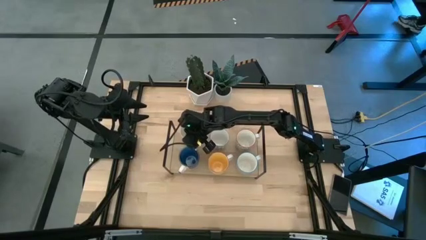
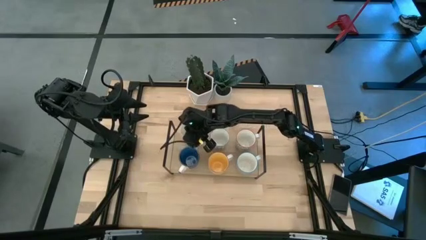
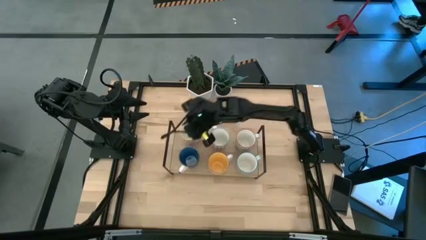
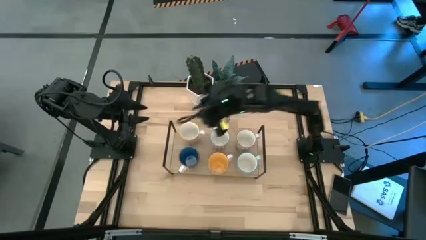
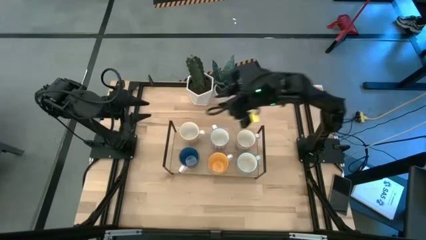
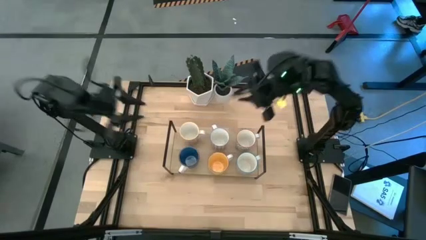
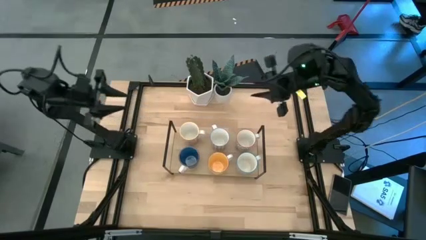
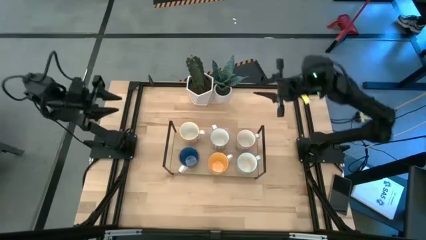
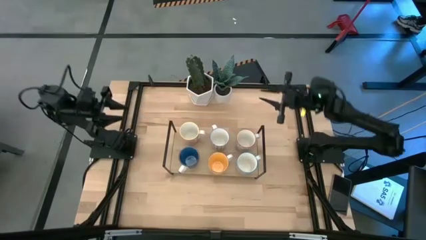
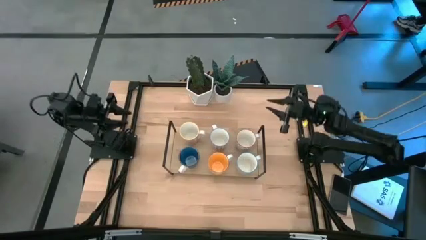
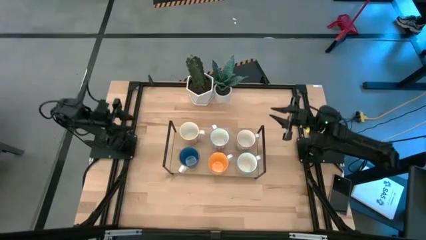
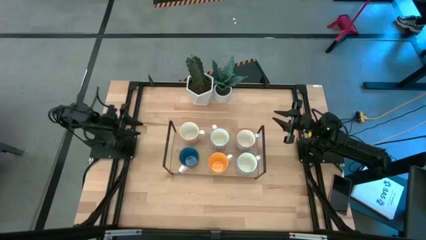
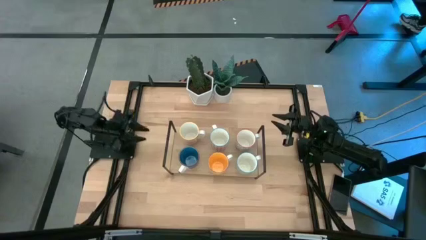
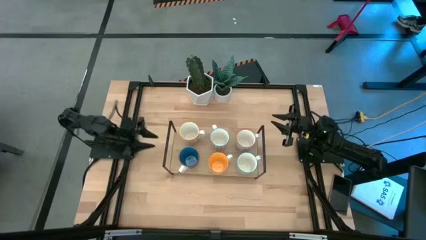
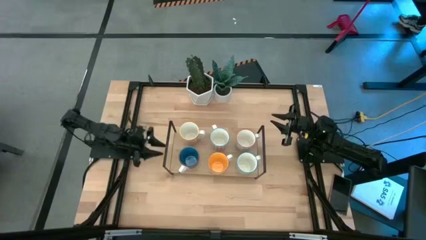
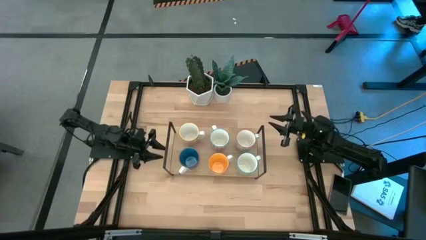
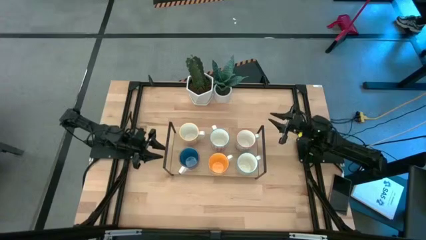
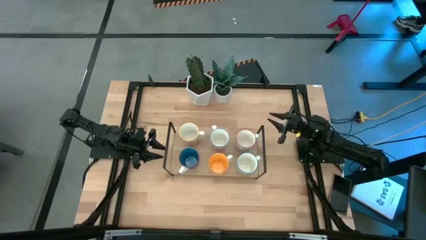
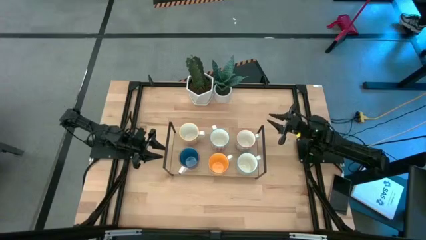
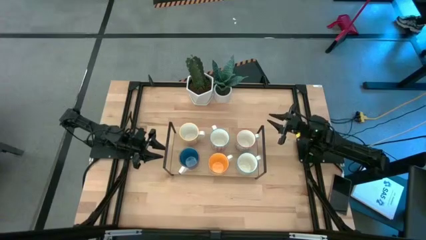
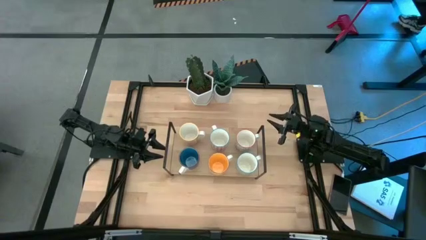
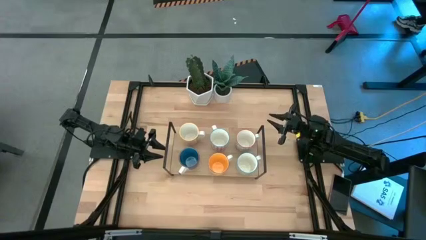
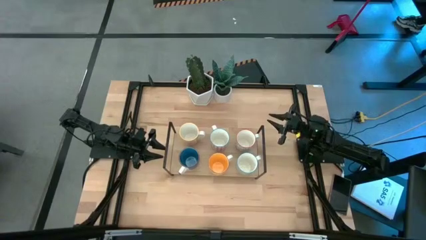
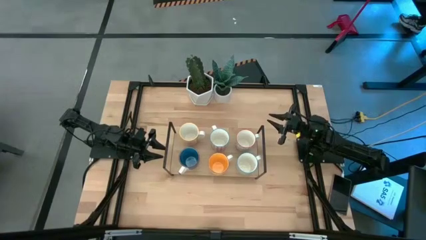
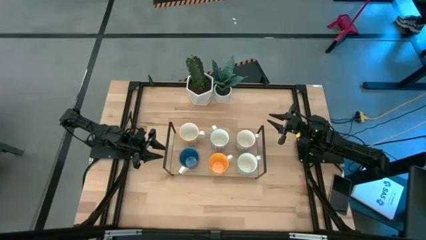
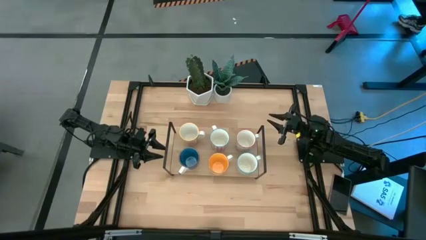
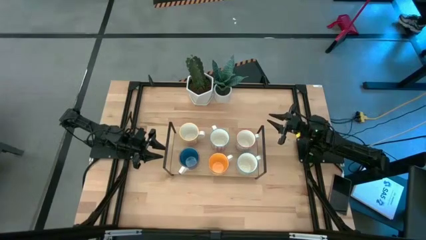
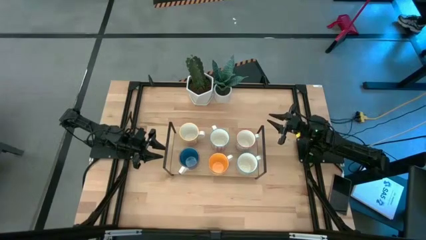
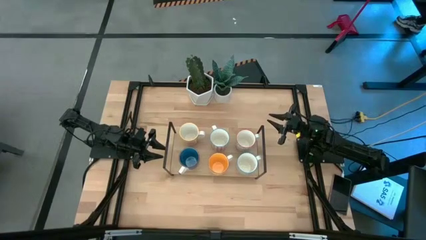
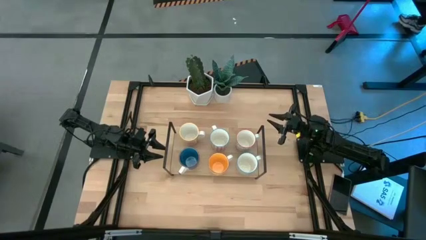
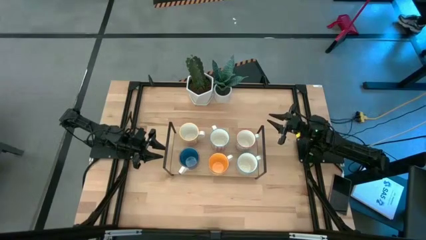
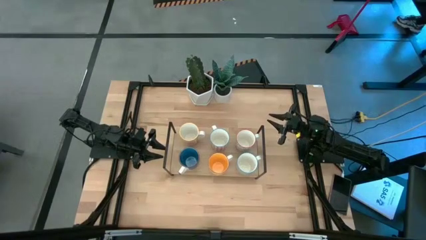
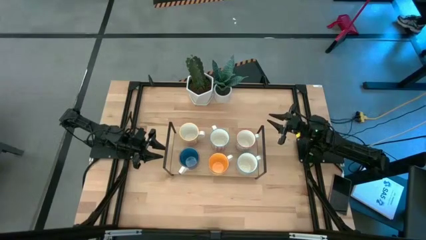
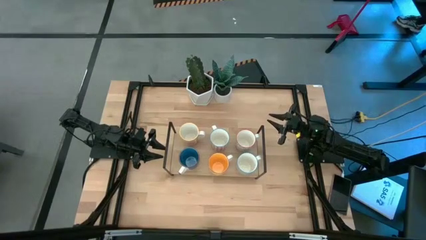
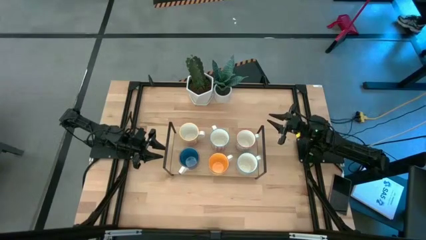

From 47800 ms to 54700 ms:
Task: Place coffee mugs
Return to Home Position

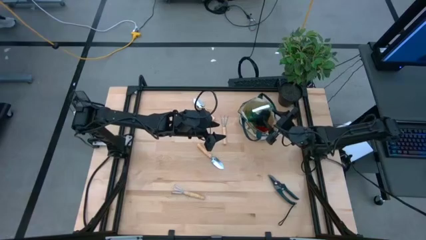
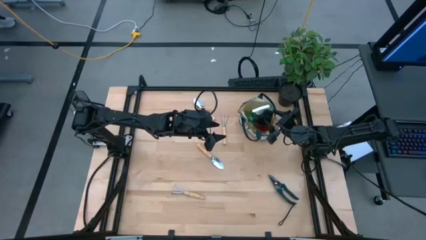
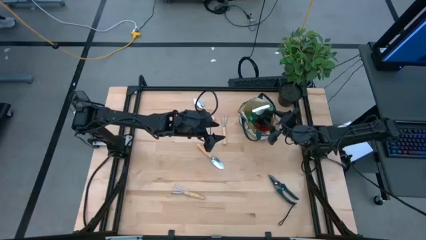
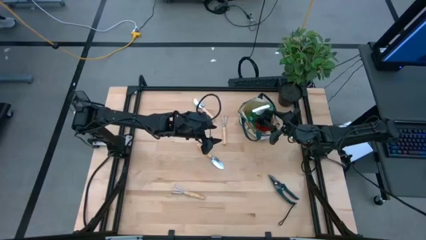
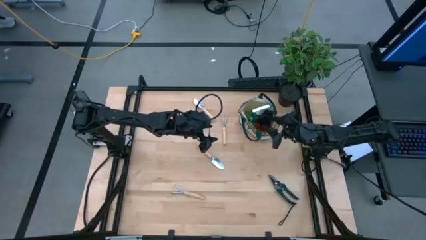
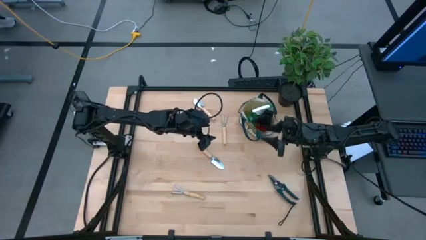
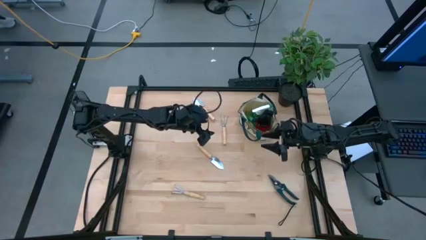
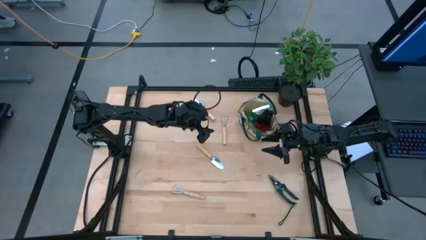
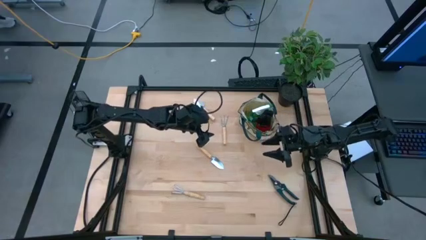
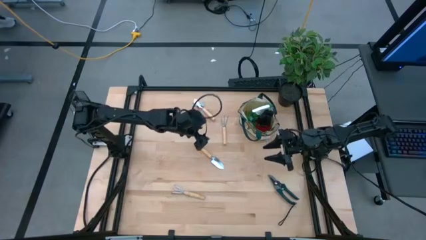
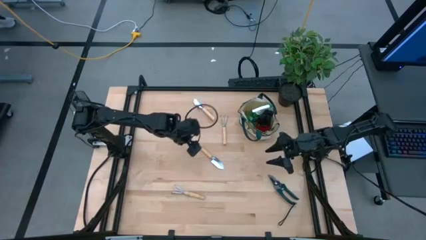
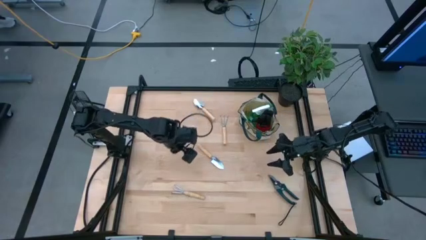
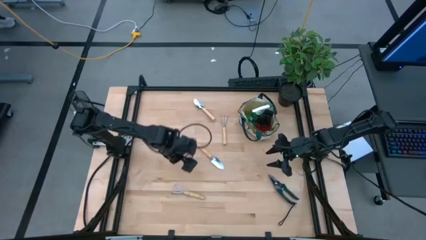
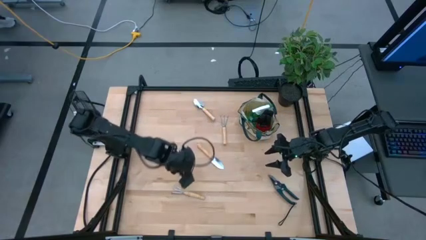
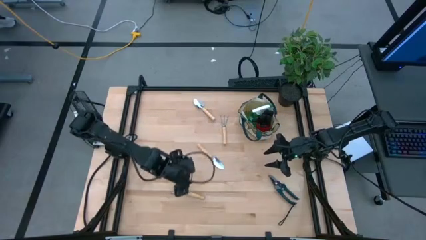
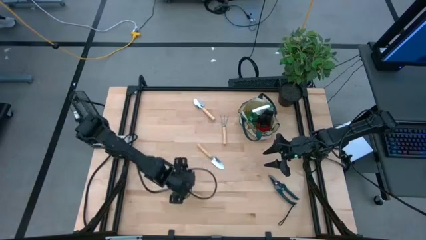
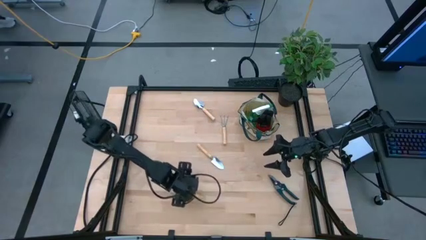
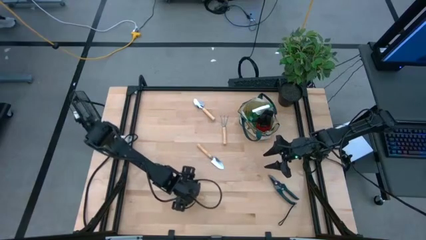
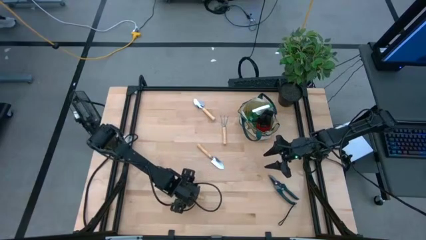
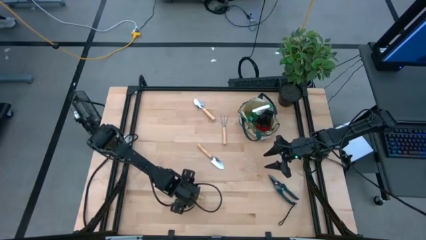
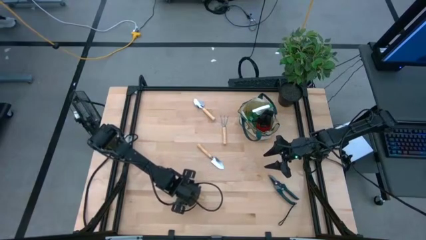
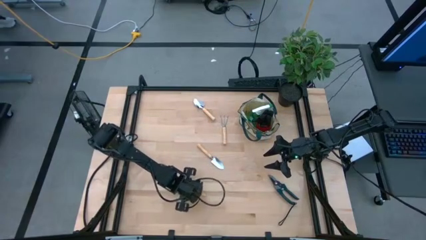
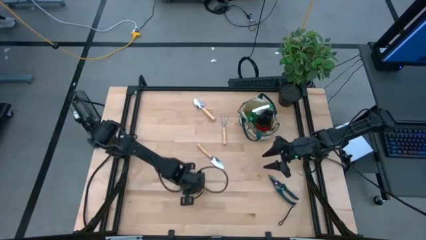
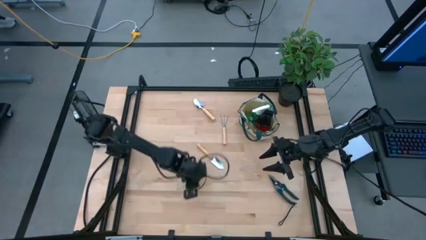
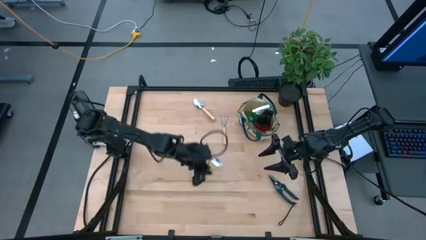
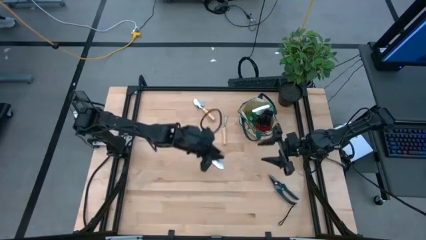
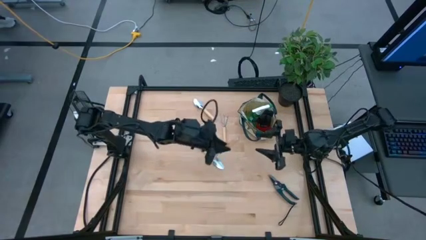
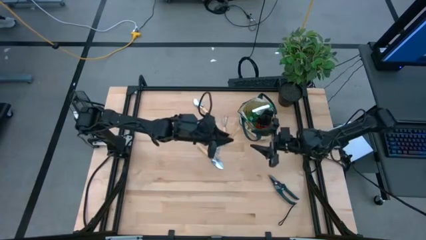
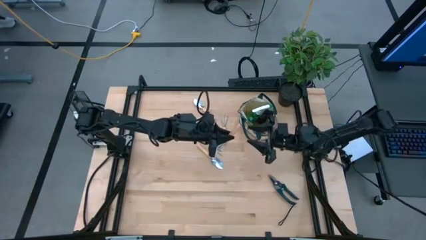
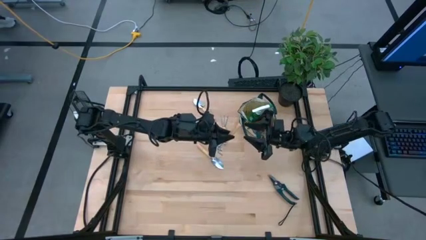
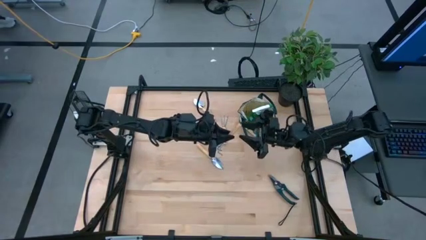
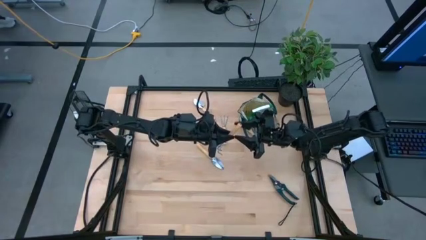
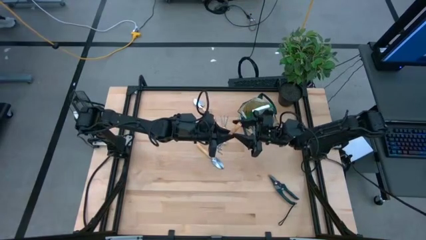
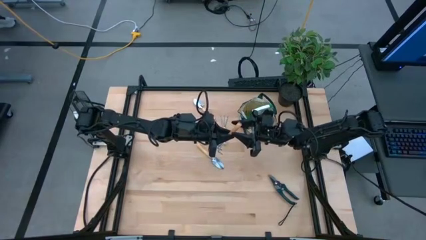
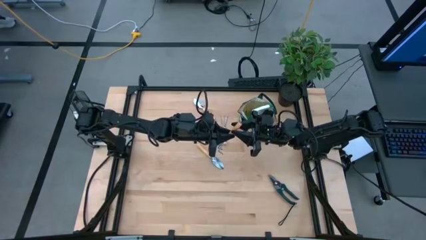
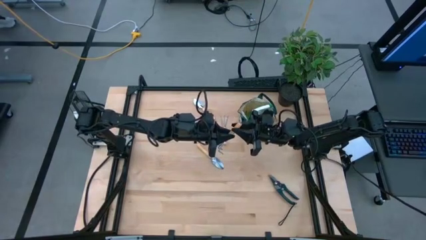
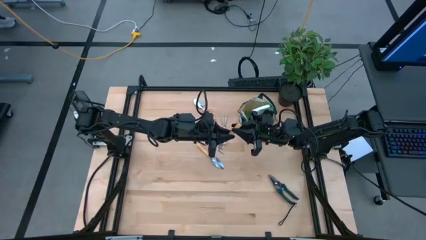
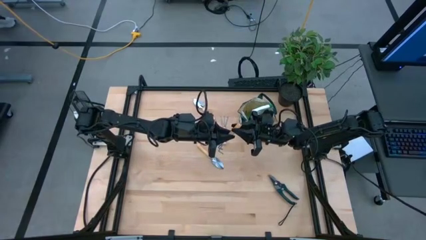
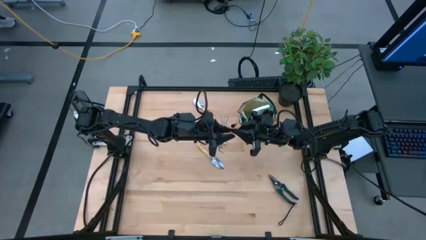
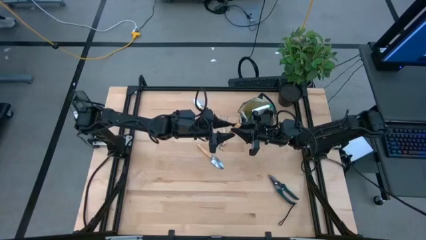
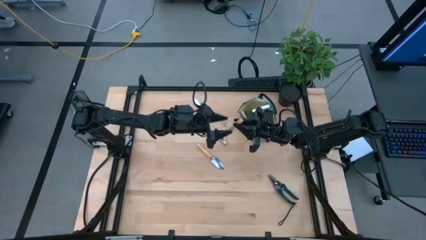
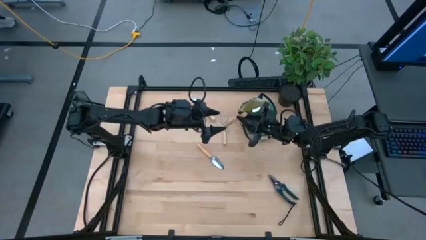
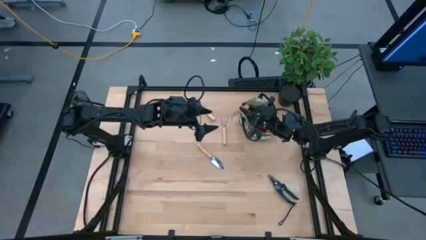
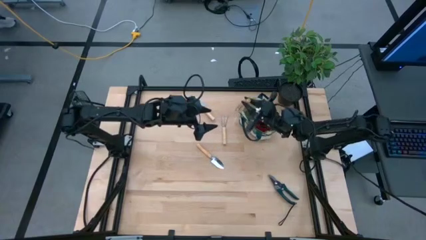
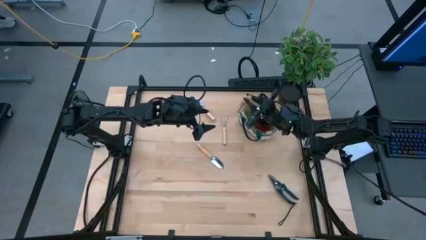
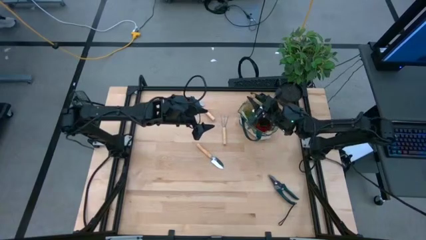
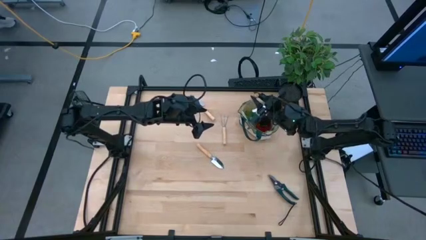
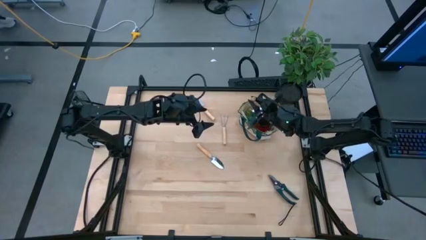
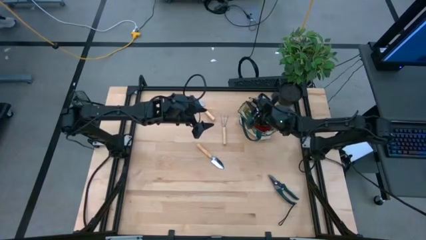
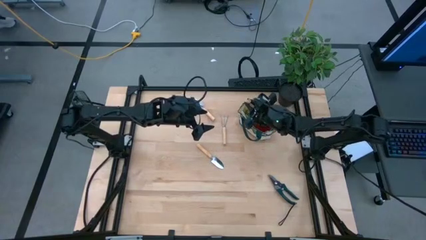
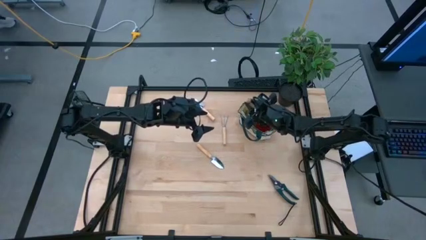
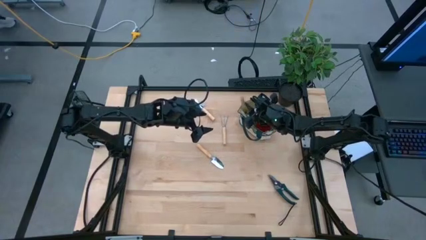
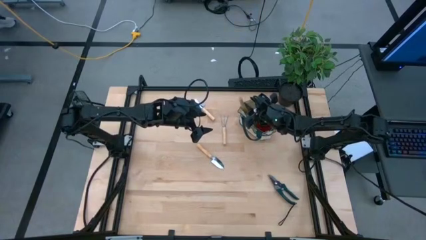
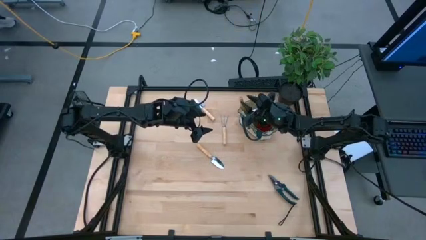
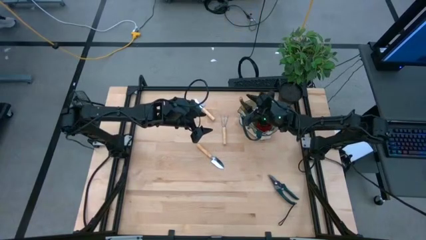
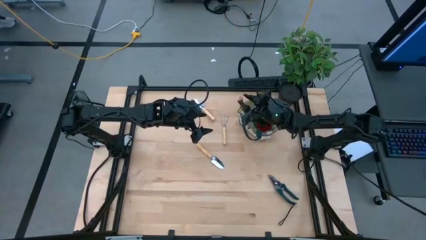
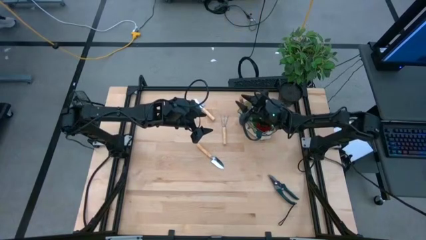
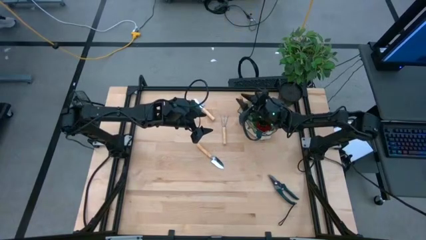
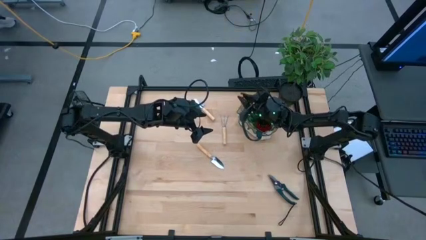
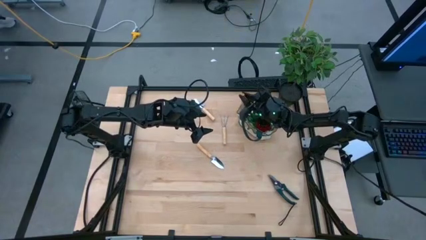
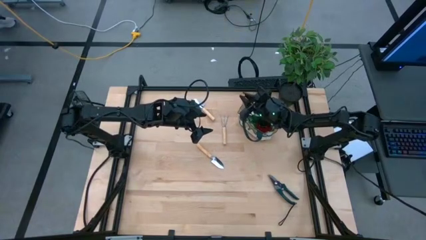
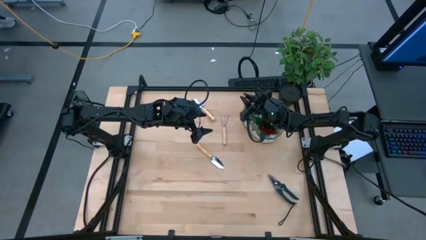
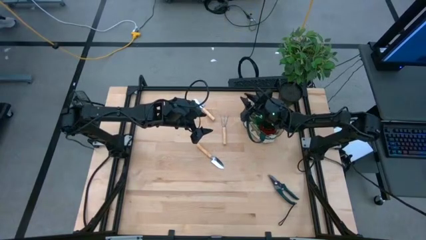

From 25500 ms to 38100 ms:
Task: Pick & Place Garden tools in Gardening bag
Put the bottom brown hand rake into the gardening bag
